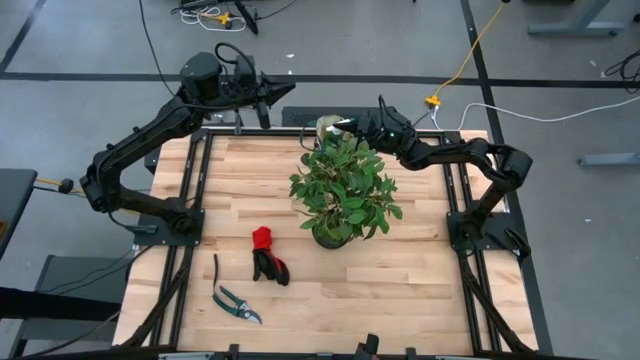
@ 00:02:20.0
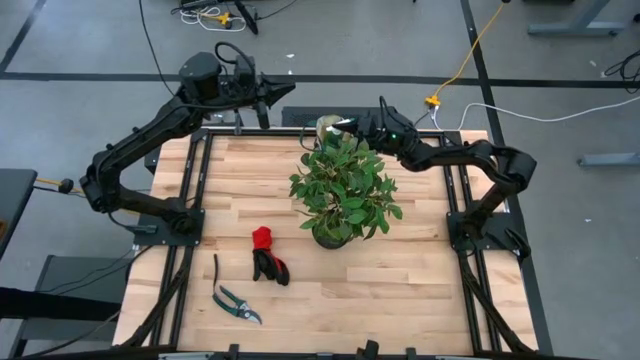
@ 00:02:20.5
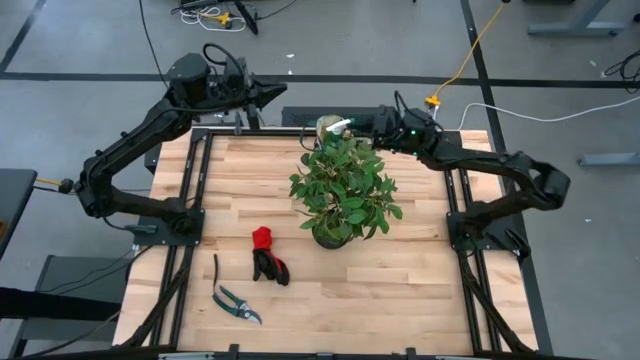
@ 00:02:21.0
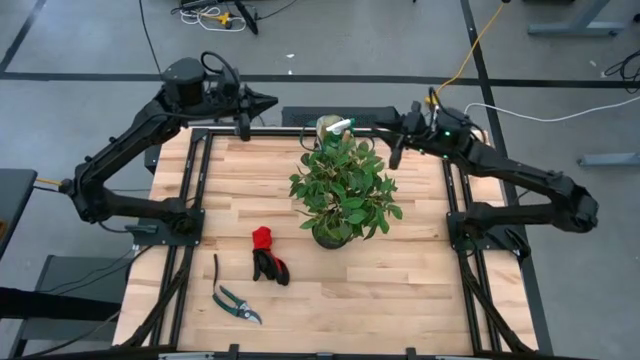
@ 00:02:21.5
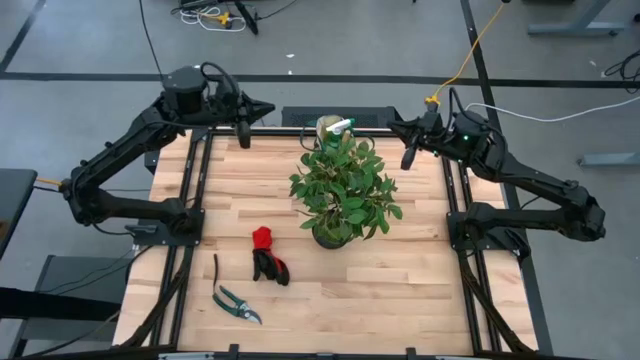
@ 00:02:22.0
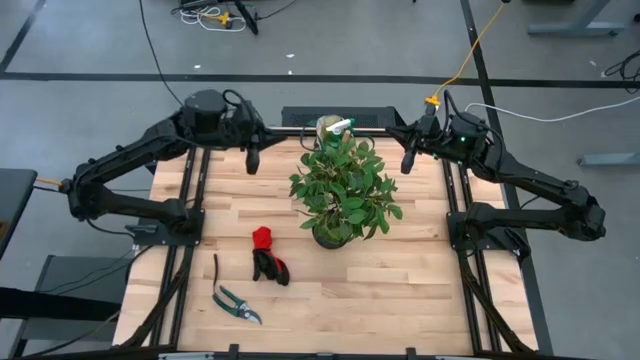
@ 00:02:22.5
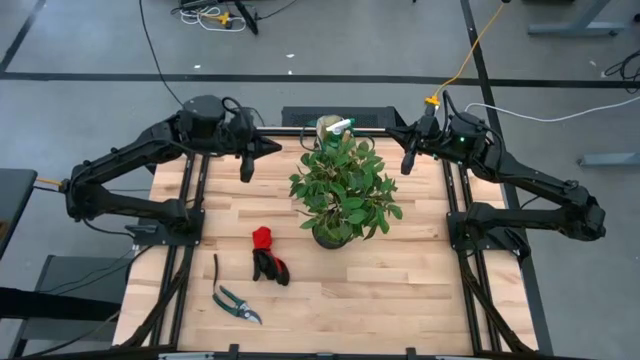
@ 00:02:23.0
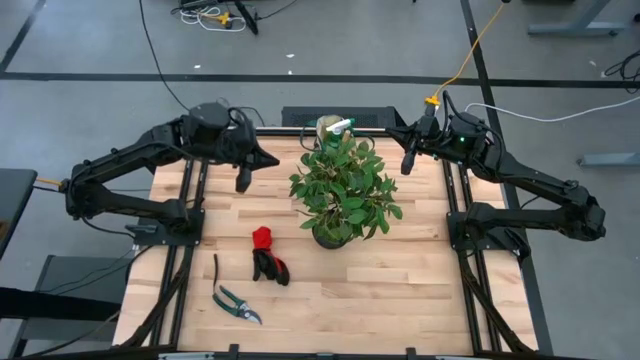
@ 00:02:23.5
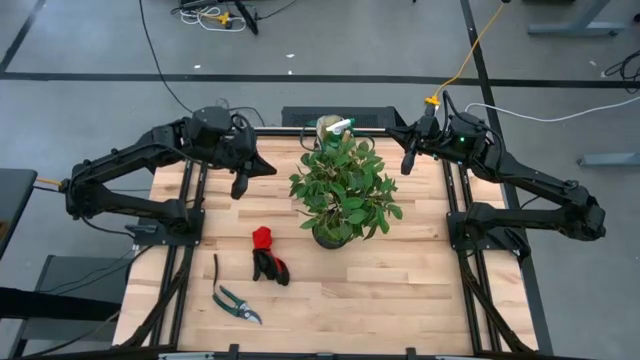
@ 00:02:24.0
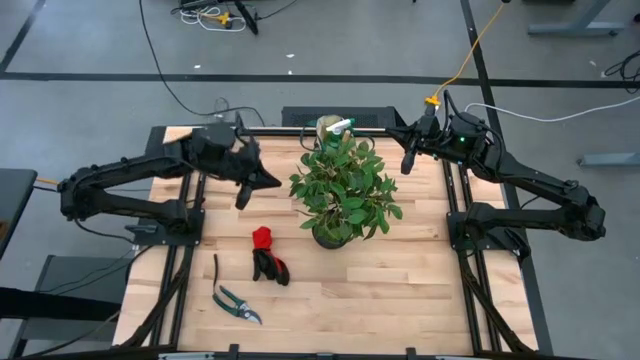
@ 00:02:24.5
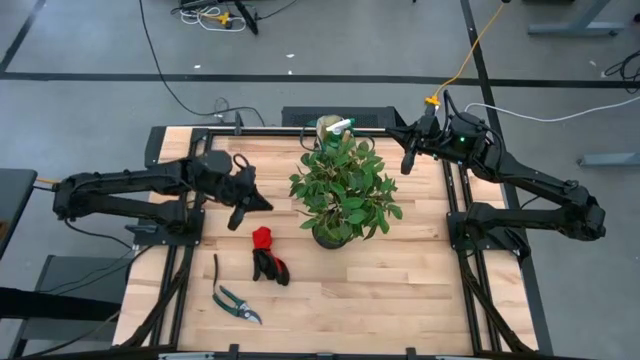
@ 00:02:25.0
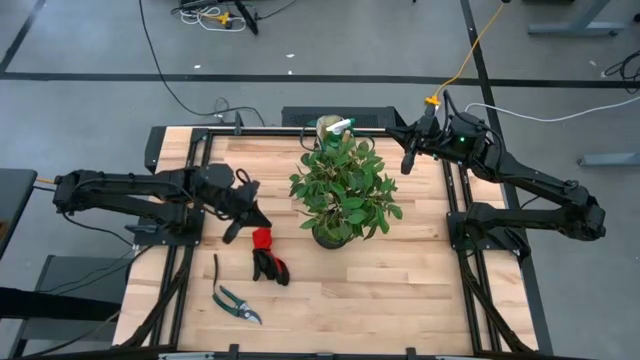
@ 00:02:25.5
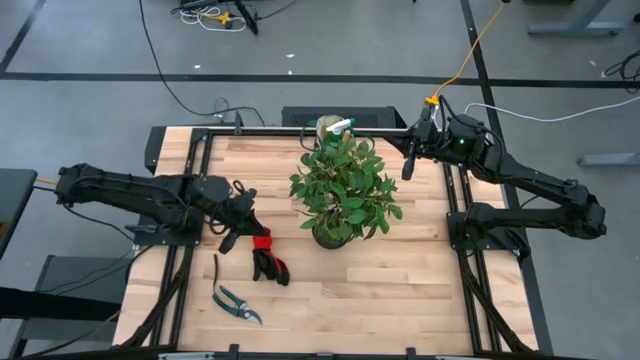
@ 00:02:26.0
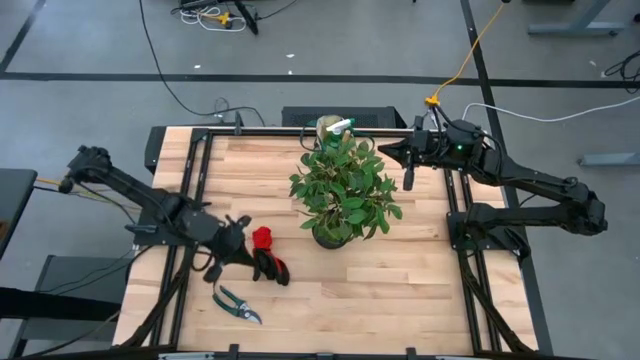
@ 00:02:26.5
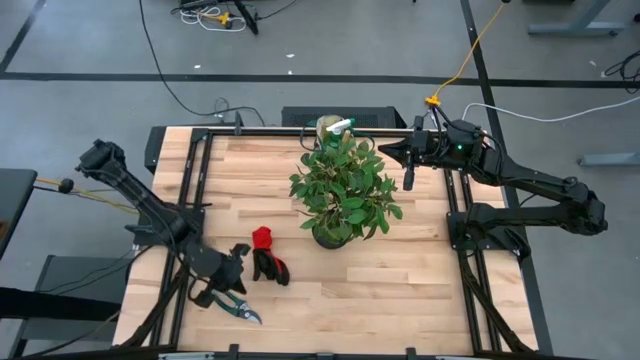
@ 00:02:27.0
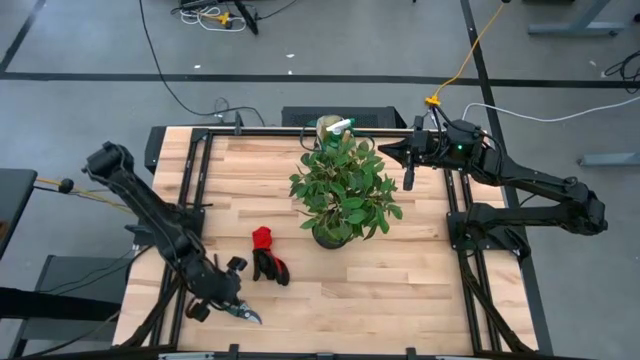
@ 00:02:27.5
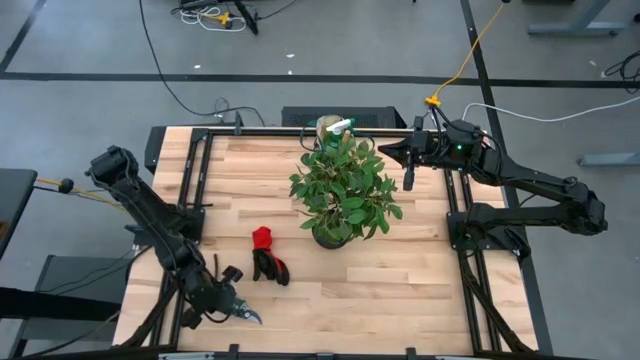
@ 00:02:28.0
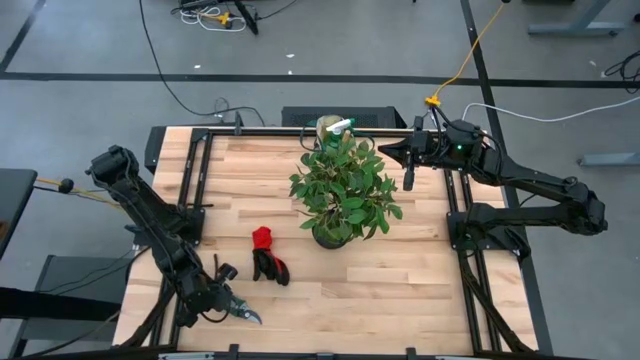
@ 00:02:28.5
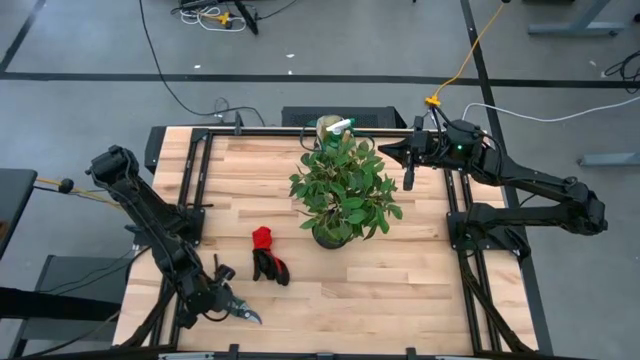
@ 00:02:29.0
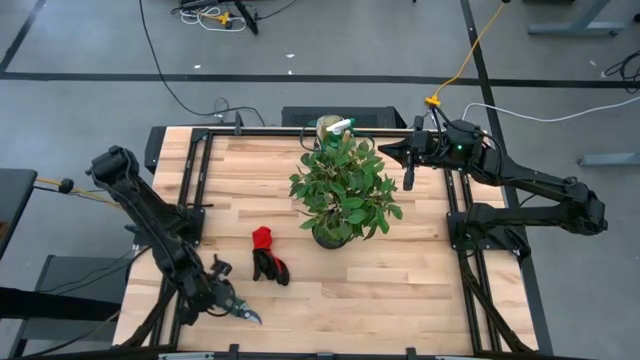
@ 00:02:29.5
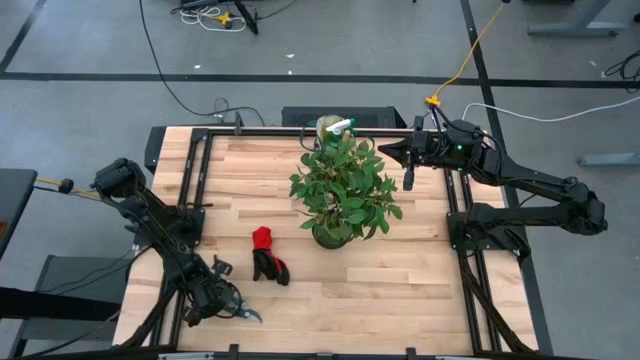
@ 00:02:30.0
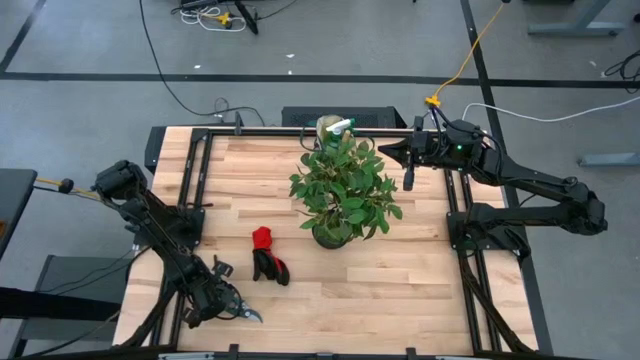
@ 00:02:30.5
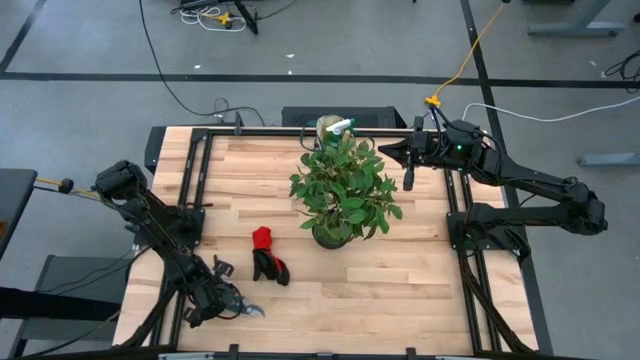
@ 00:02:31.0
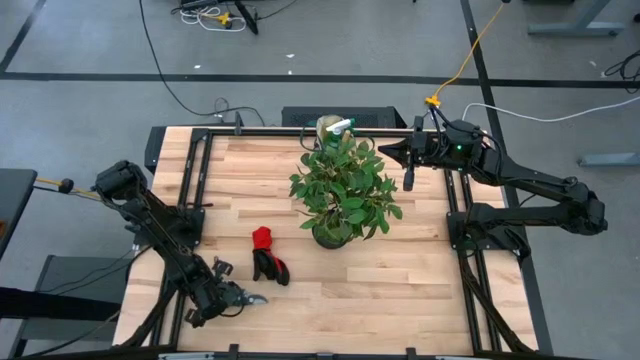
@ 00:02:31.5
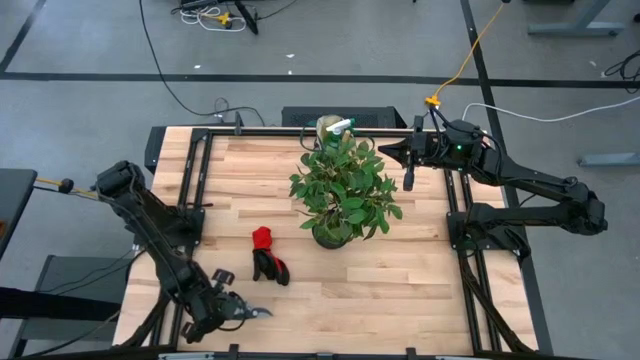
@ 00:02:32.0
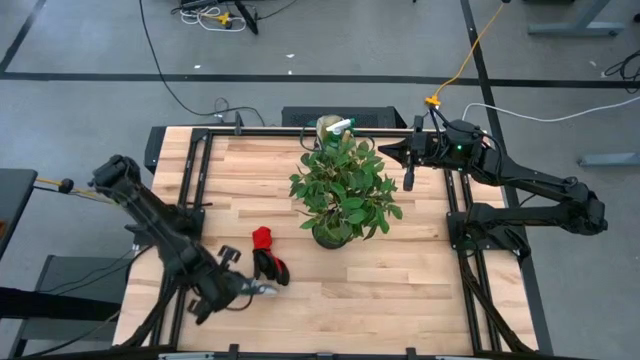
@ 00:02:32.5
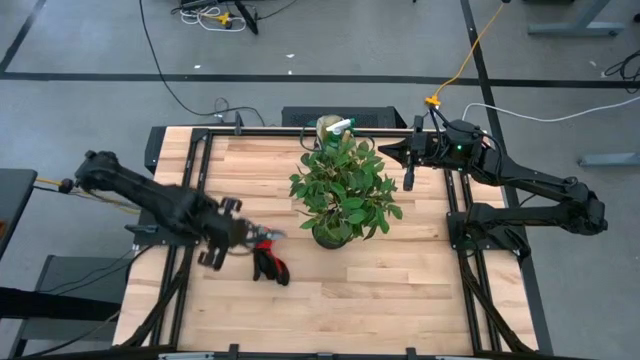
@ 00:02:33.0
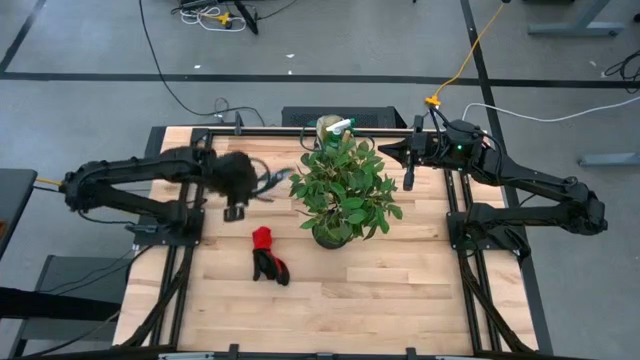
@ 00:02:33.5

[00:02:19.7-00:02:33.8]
Task: Pick & Place Garden tools in Gardening bag
Put the green shear scissor into the gardening bag

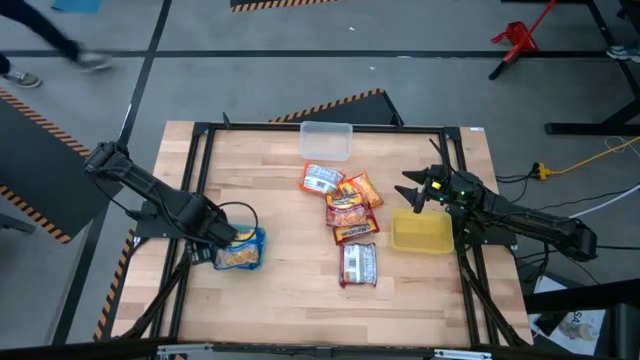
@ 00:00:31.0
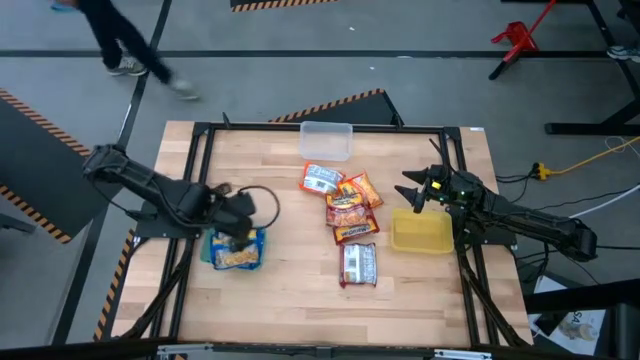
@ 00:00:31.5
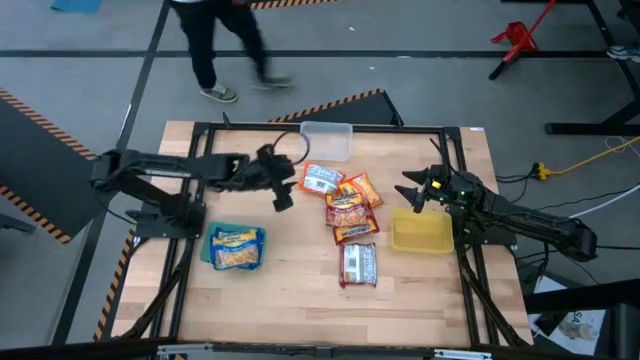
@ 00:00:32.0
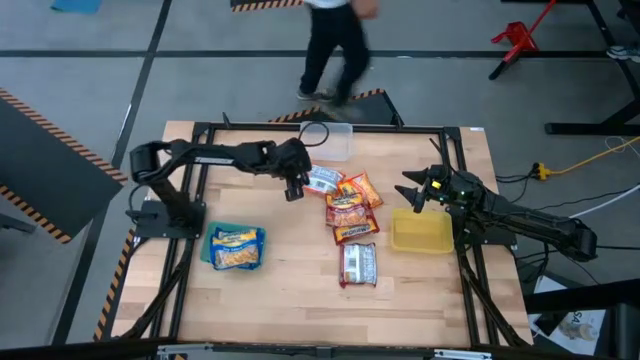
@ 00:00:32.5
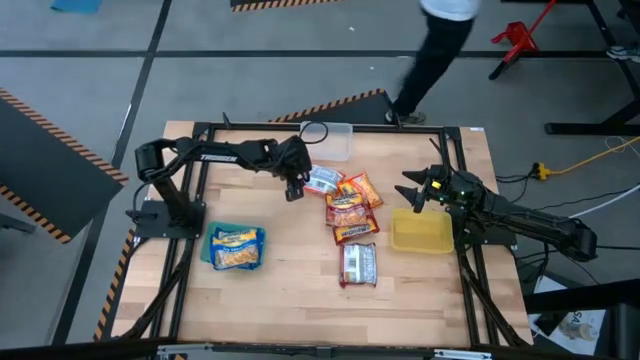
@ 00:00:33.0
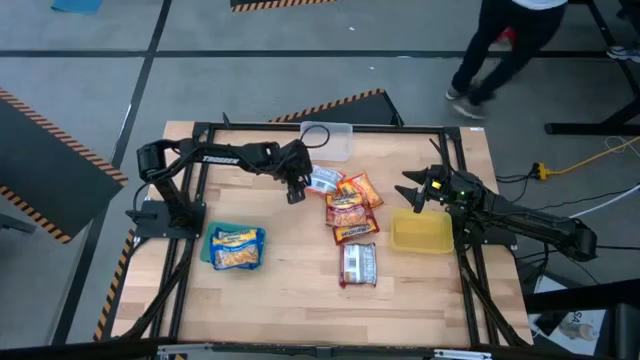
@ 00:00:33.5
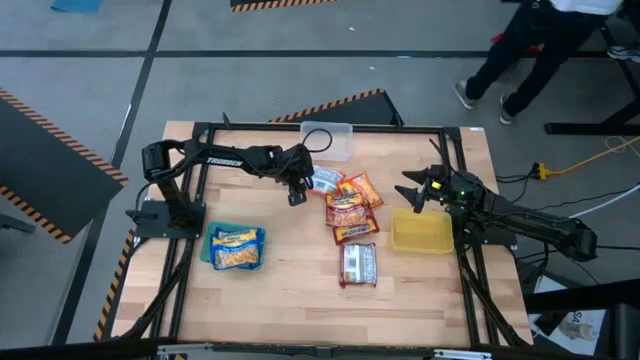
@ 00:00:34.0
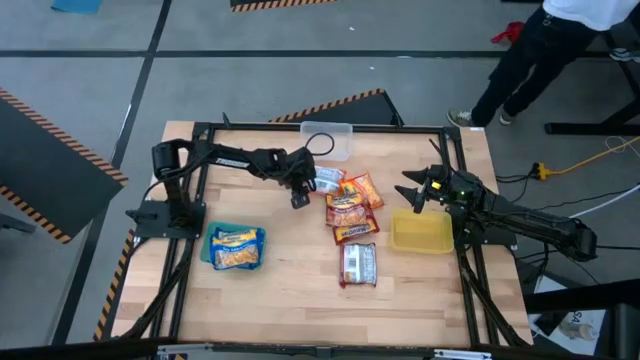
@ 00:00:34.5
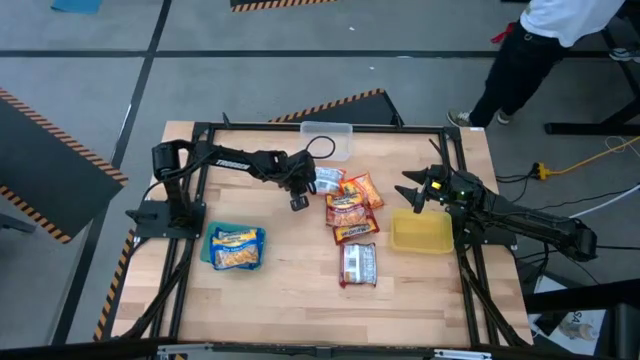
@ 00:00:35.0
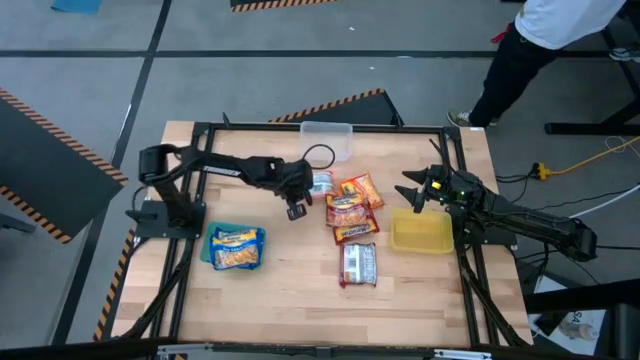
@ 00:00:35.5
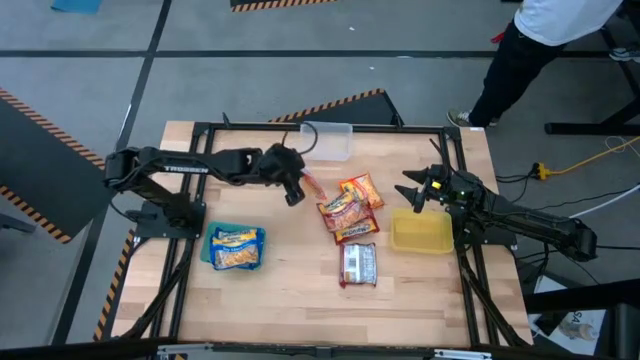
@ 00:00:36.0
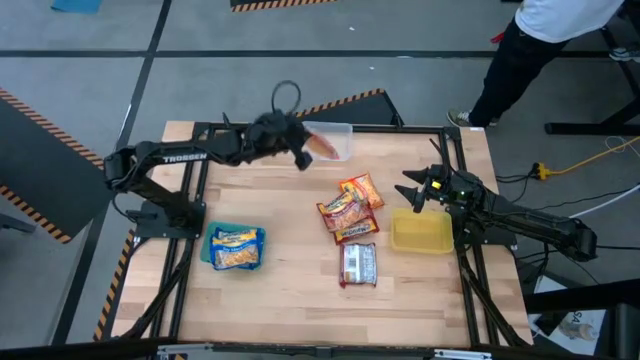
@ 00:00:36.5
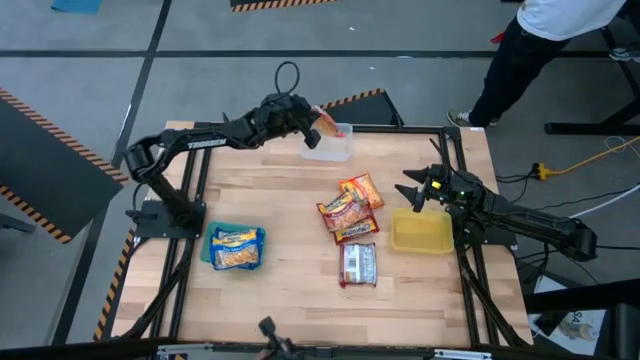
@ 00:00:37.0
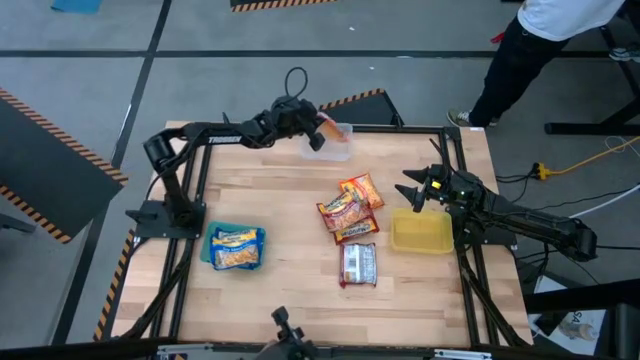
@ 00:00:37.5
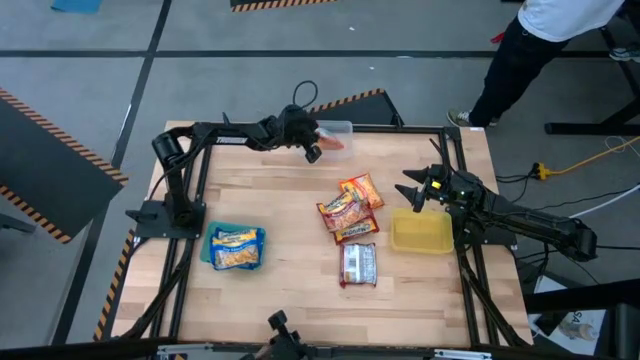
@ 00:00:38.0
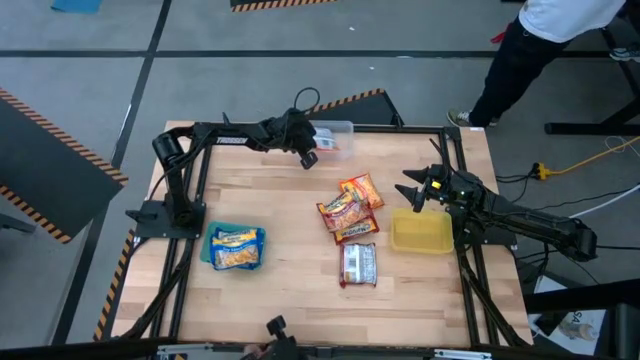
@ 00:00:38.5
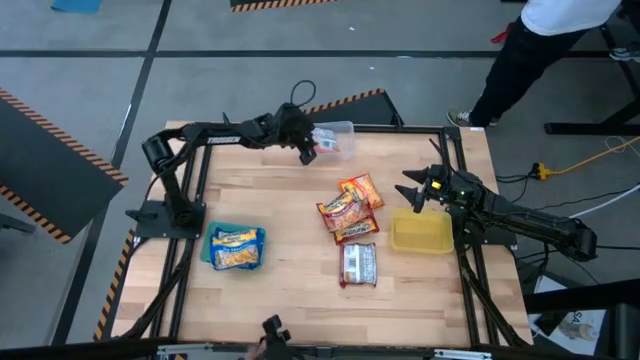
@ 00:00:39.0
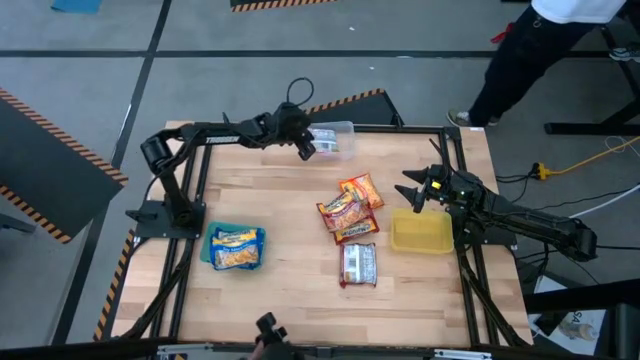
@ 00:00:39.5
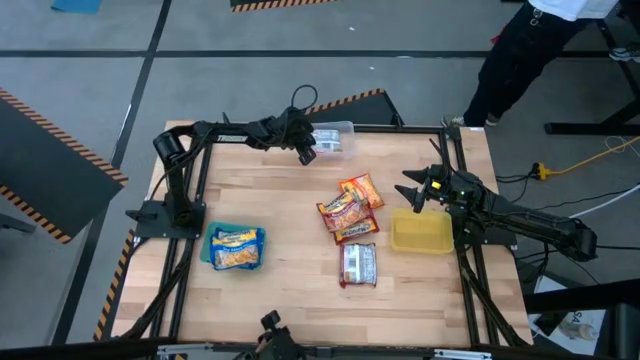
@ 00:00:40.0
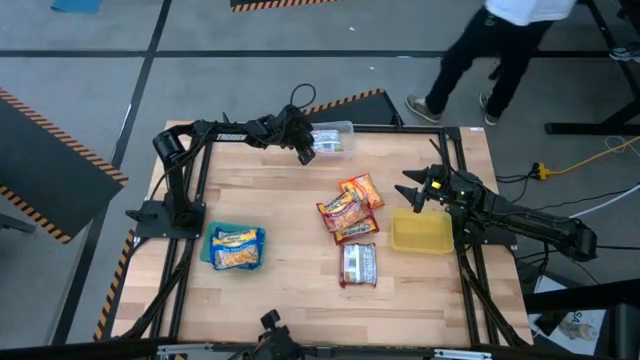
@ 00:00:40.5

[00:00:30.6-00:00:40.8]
Task: Sort Maruchan noodles
Put the left orange noodle pack into the transparent bin
